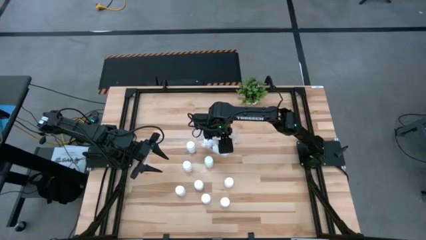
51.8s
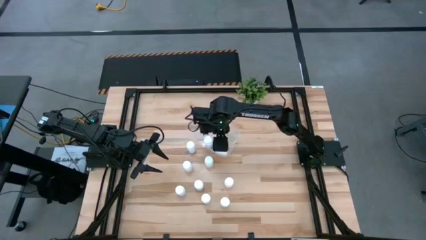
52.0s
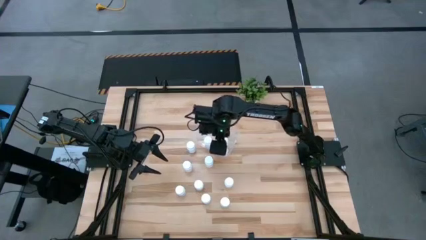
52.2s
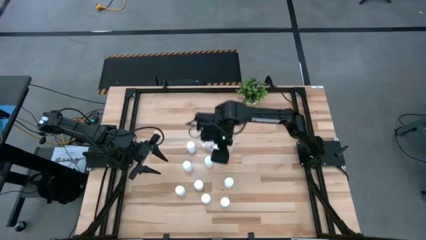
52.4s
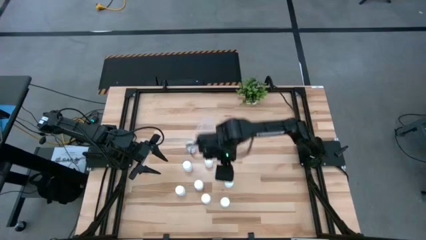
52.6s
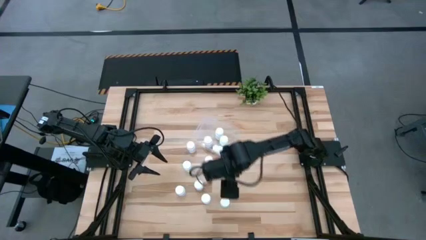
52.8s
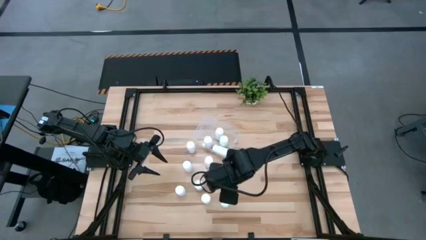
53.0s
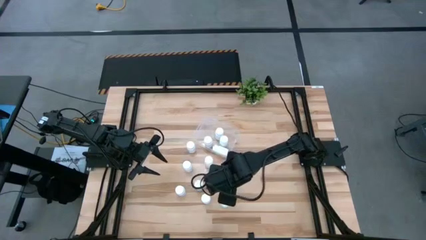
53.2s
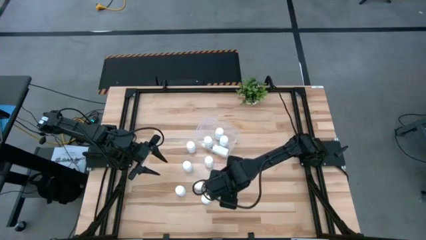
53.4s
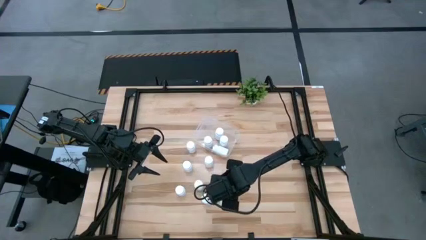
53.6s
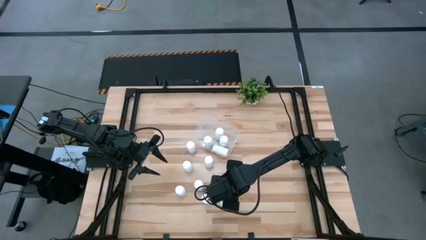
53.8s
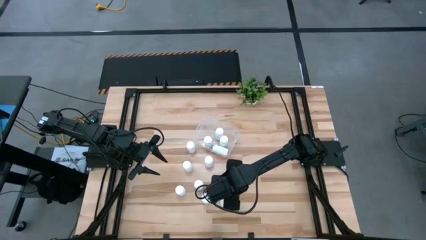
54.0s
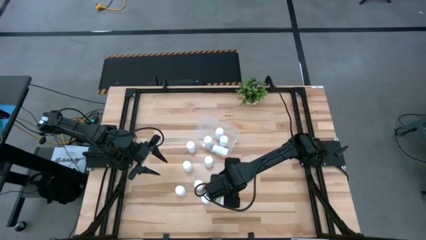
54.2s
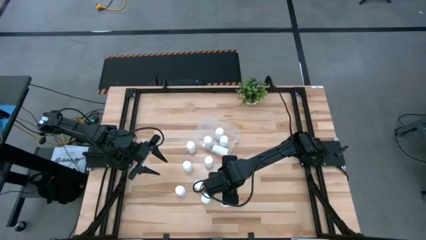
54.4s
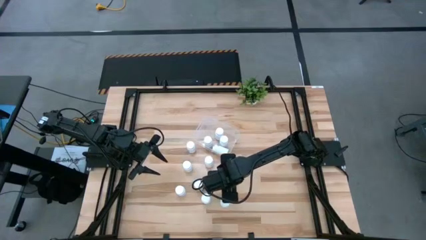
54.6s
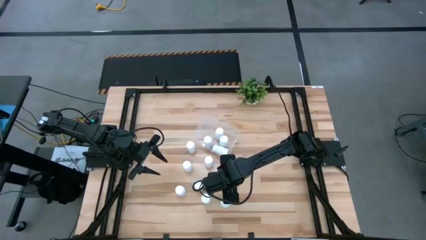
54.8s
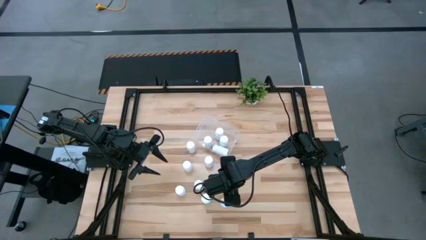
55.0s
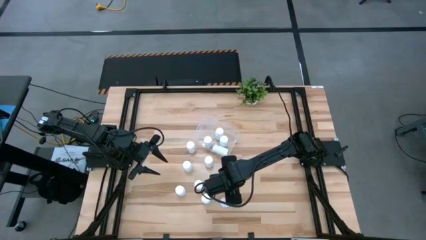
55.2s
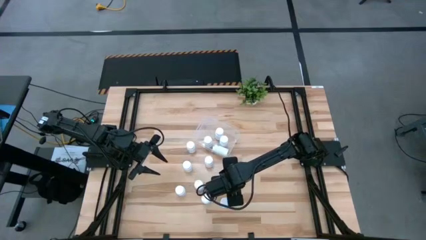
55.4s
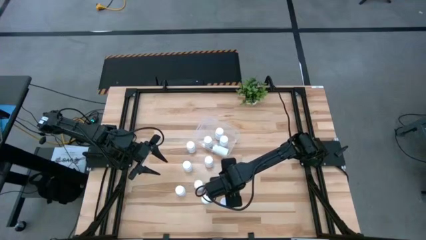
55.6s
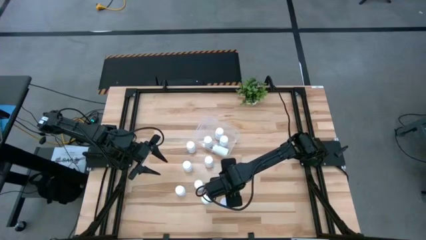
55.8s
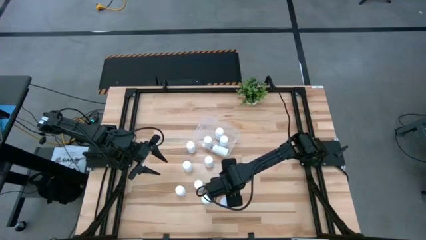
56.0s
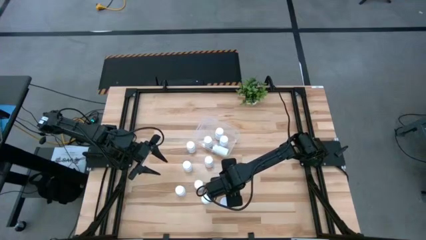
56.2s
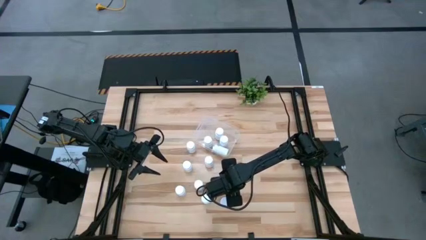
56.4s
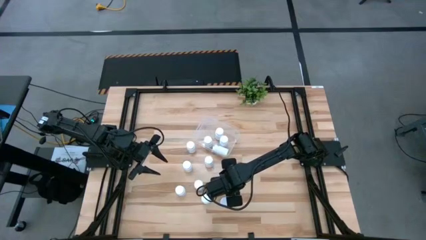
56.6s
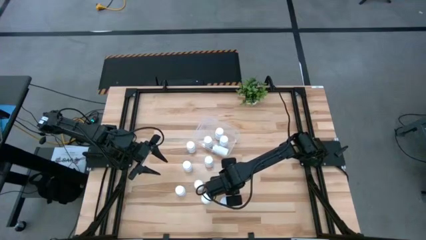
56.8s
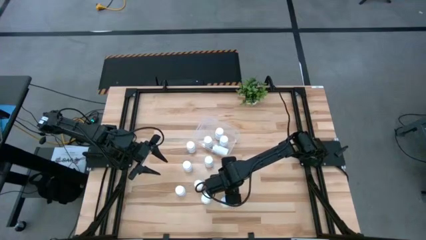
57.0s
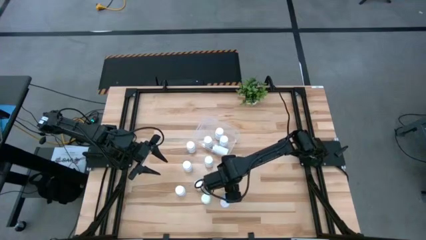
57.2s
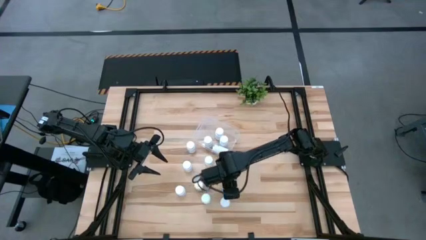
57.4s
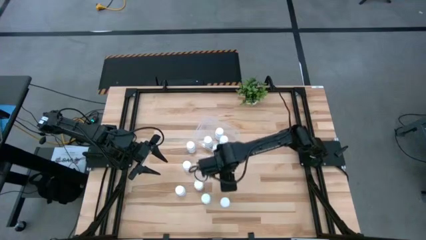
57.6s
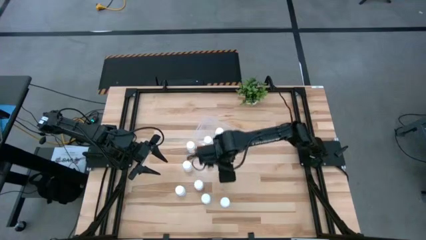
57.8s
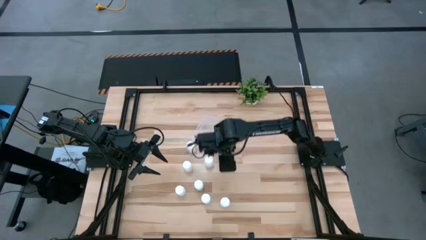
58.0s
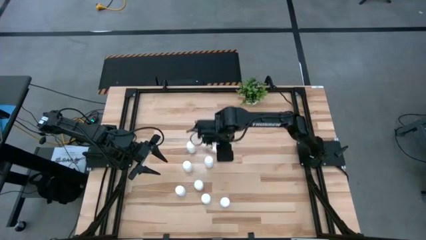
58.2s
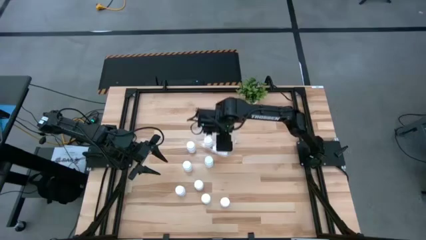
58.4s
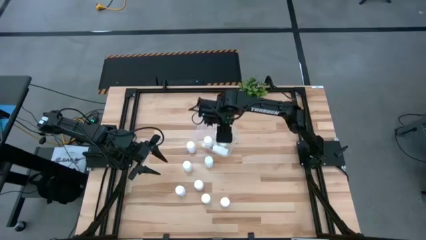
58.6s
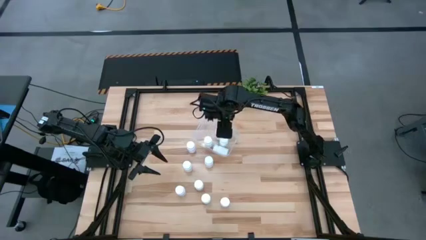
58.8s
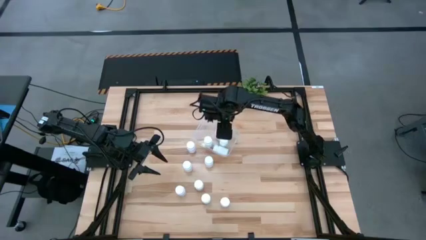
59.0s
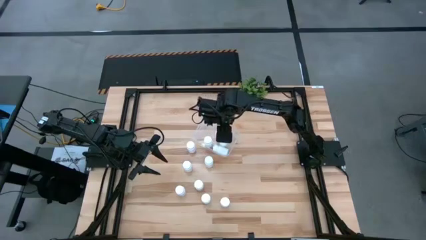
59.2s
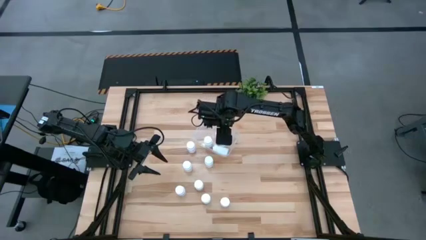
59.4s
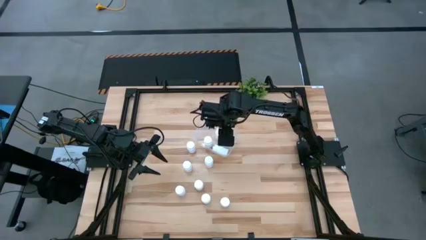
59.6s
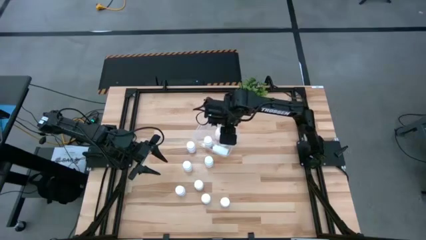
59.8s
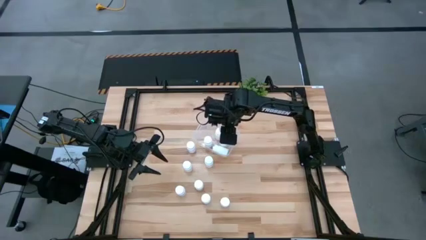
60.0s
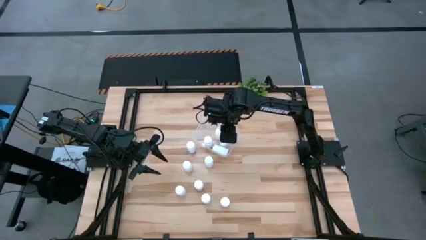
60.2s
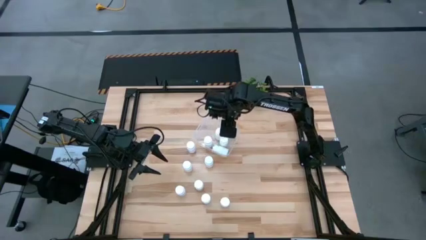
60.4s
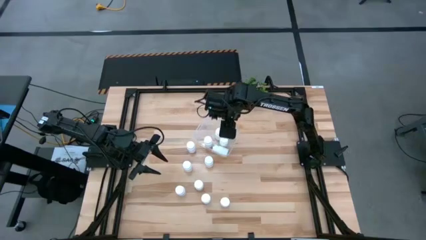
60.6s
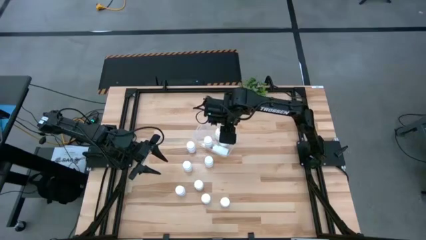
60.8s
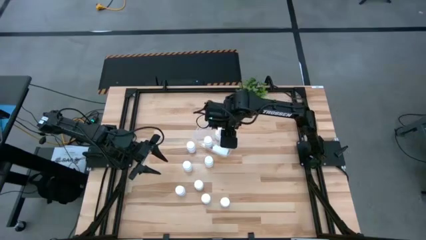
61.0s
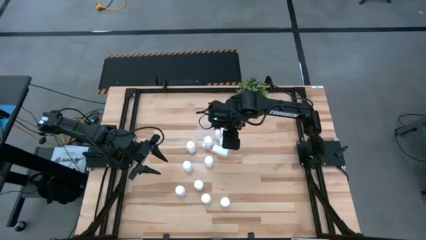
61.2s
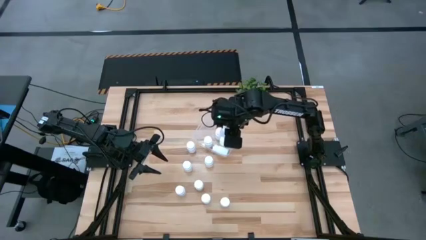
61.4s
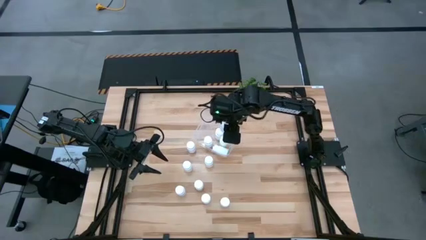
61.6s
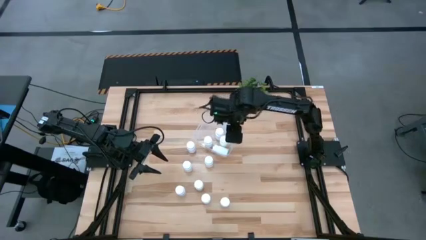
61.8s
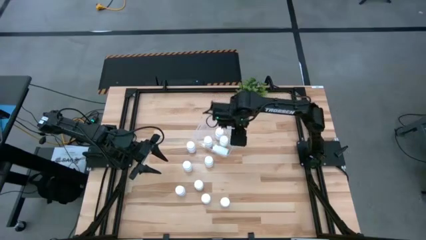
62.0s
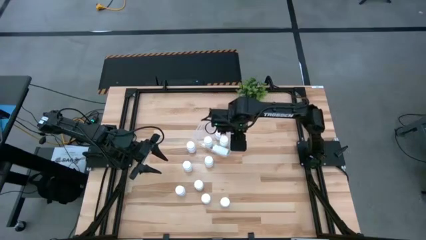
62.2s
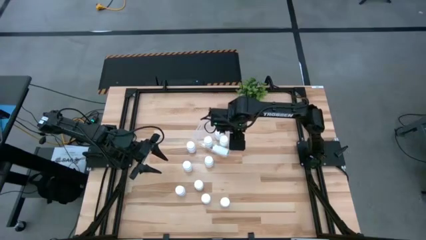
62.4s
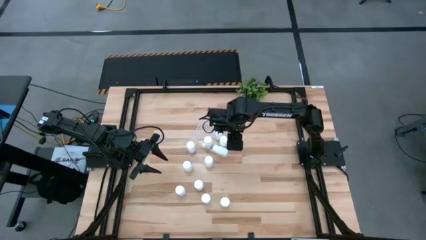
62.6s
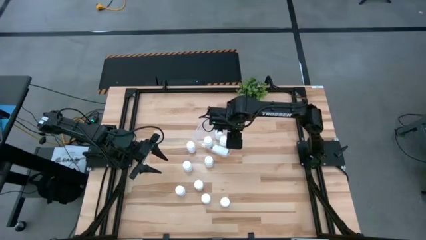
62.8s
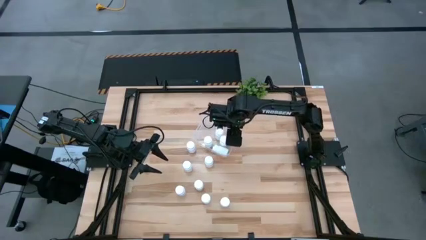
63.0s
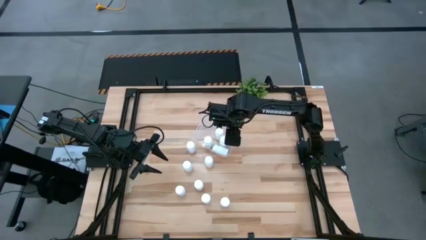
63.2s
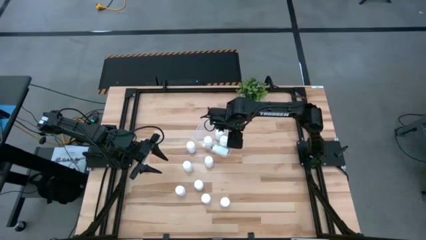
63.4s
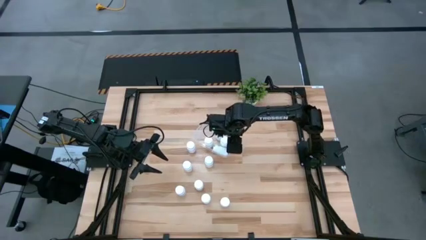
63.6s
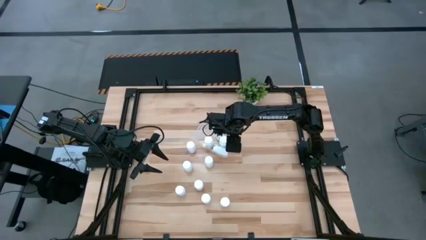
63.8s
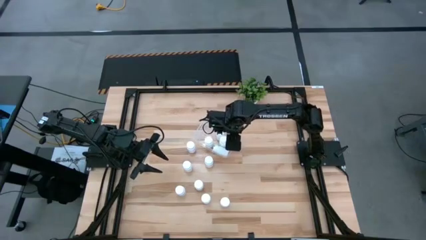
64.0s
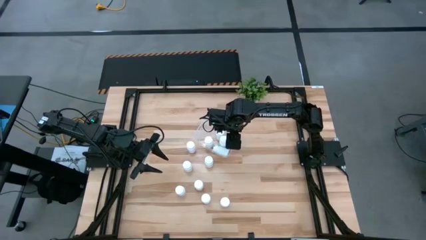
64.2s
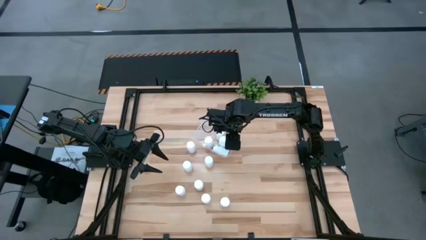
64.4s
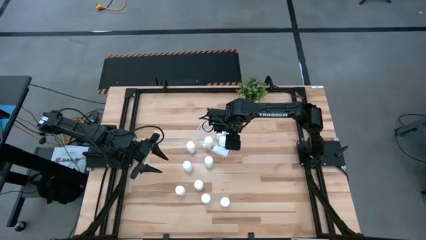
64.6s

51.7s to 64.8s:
Task: Pick and place pill bottles into a basket
Put the pill bottle into the bin

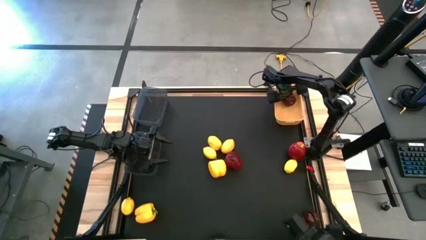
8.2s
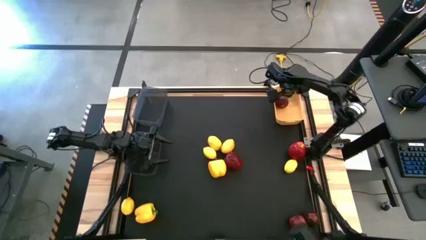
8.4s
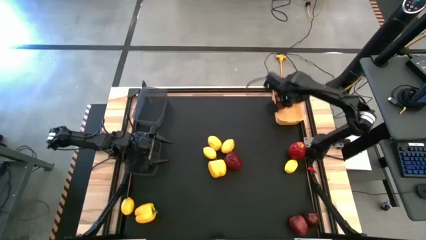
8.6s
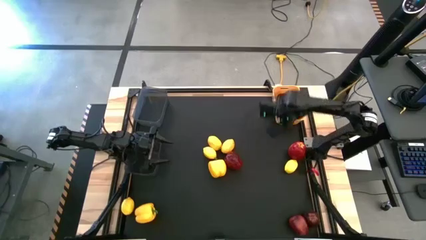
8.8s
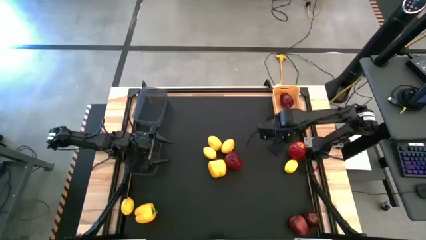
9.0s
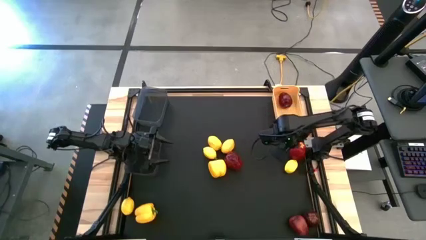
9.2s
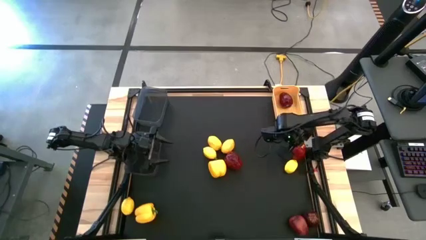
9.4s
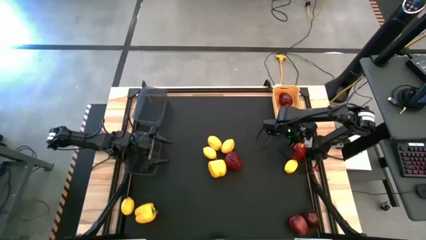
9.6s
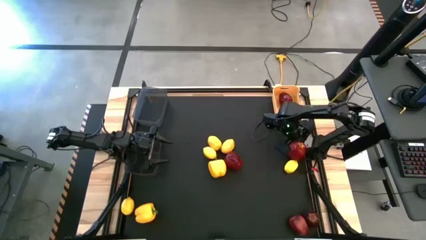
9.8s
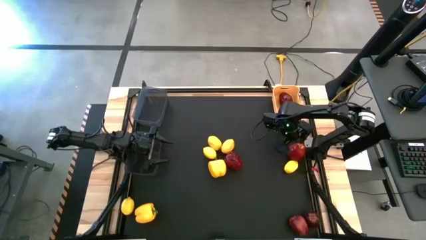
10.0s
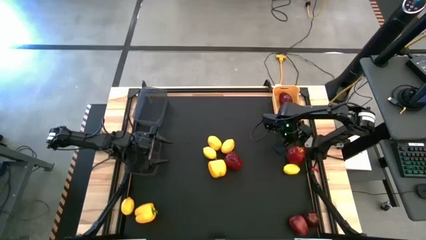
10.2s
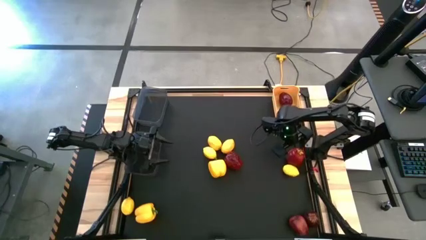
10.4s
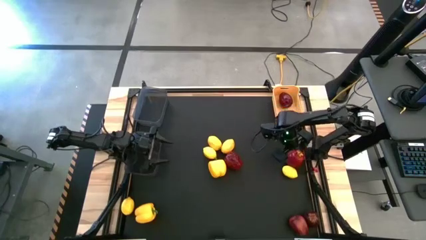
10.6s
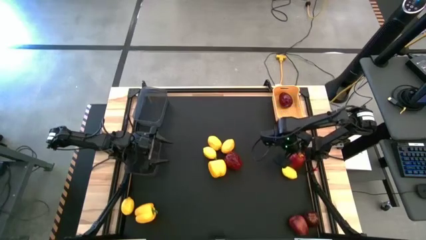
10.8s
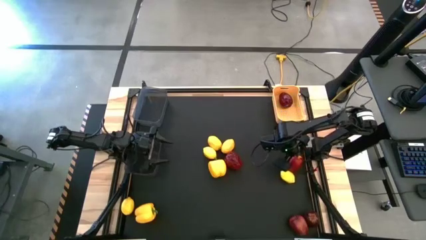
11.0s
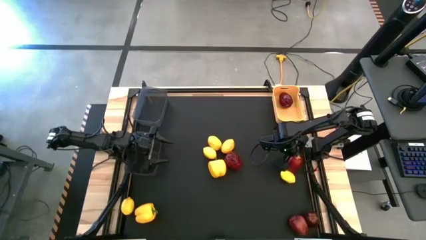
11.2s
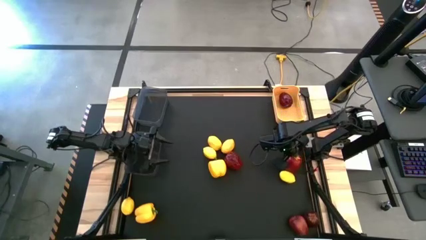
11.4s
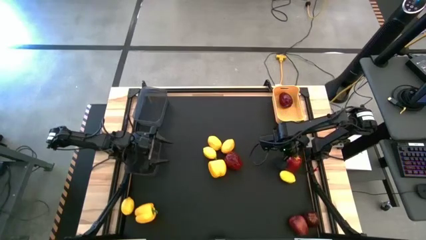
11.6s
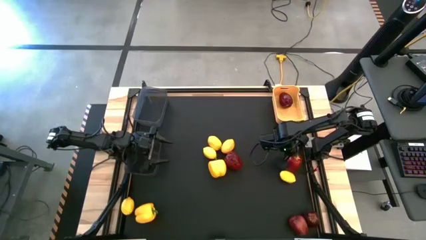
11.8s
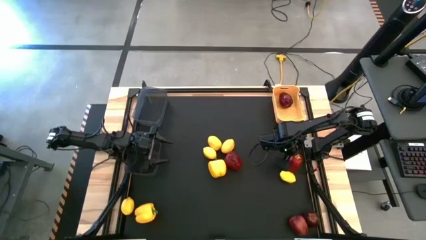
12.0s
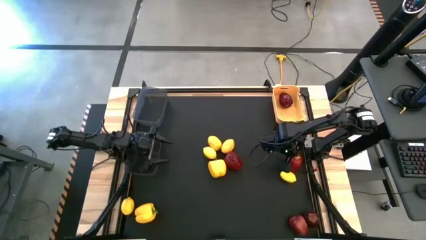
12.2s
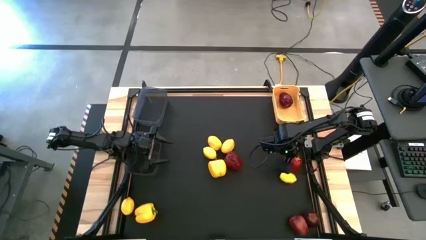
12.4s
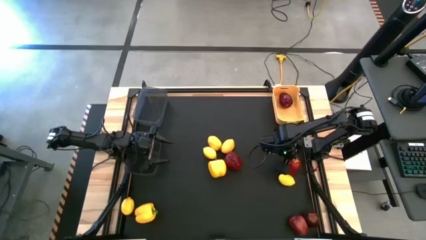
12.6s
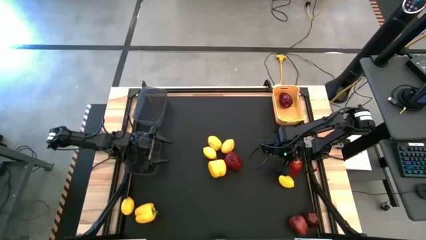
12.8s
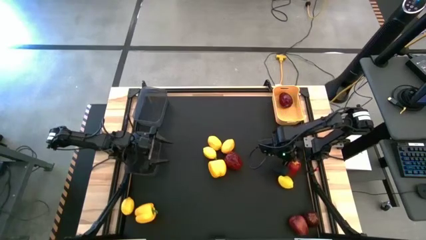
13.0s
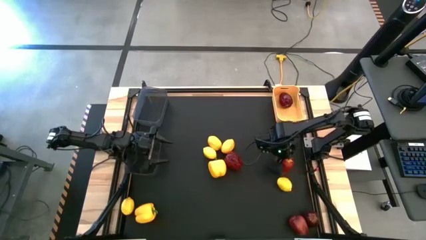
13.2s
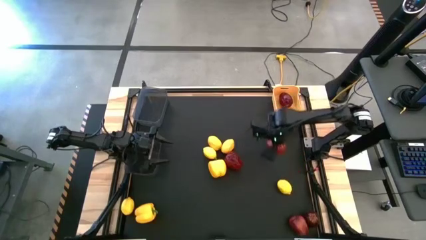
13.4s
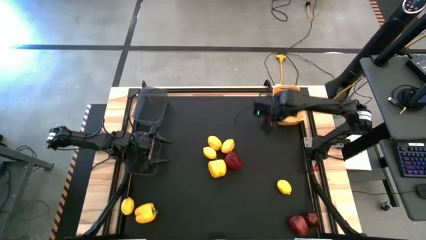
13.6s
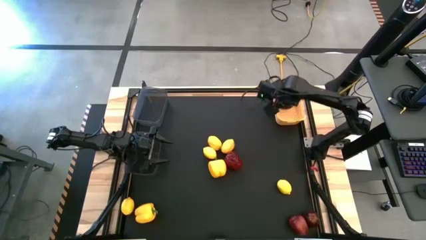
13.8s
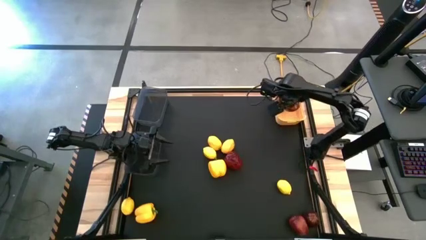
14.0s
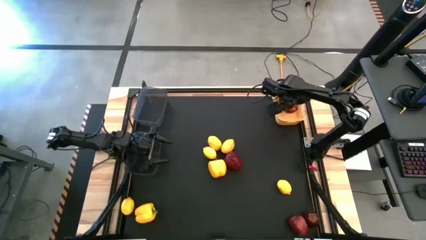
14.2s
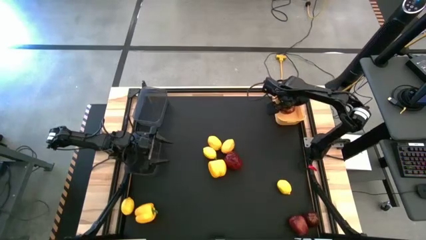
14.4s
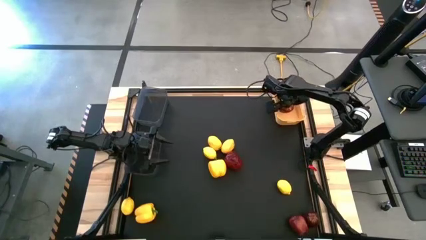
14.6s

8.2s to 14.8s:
Task: Sort produce into baskets
Put the apple into the yellow bin
